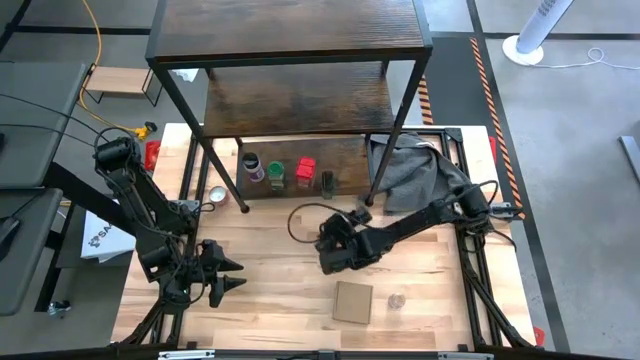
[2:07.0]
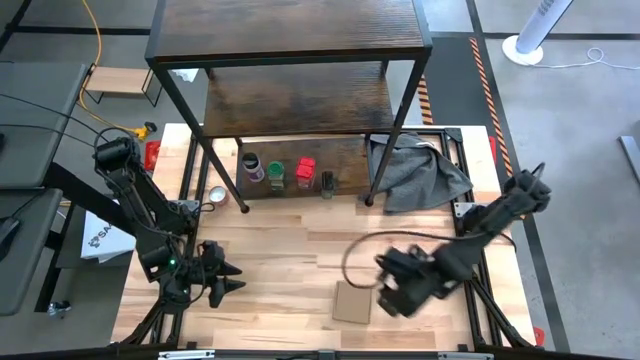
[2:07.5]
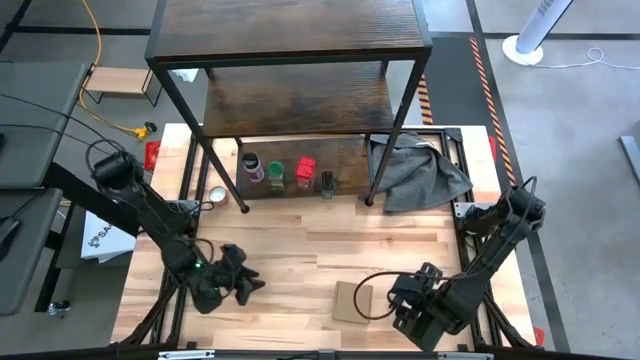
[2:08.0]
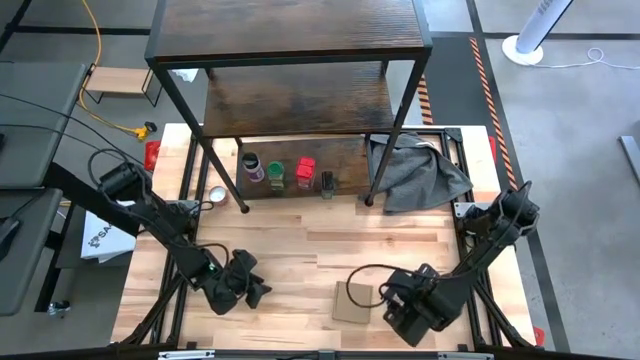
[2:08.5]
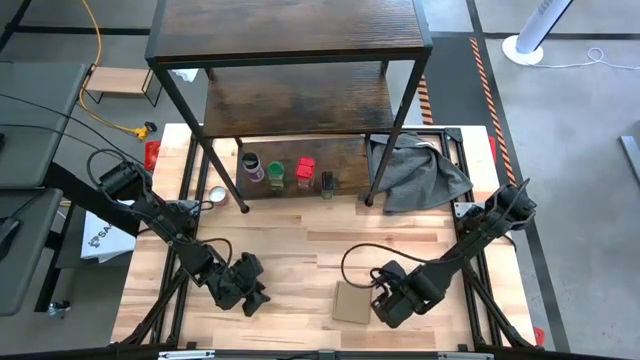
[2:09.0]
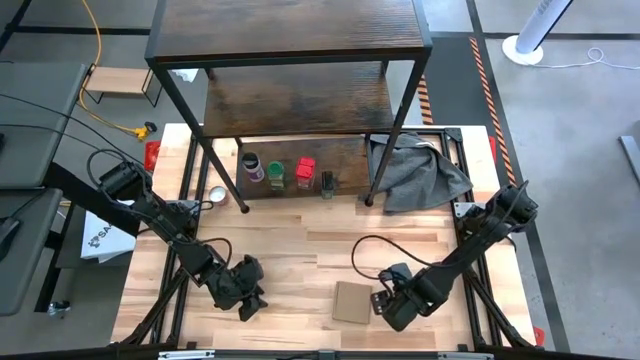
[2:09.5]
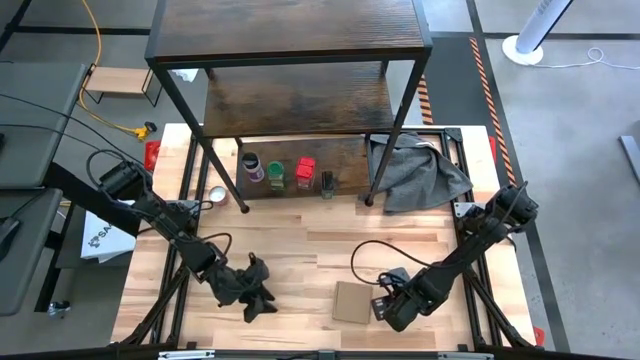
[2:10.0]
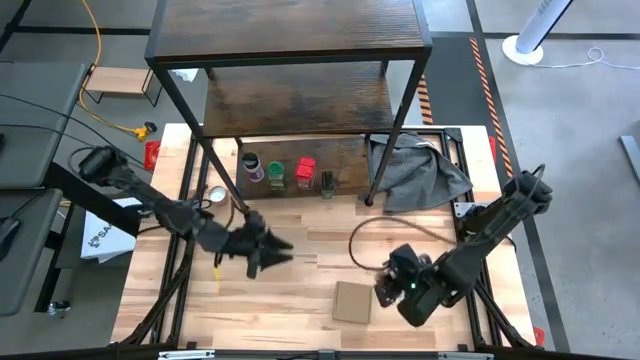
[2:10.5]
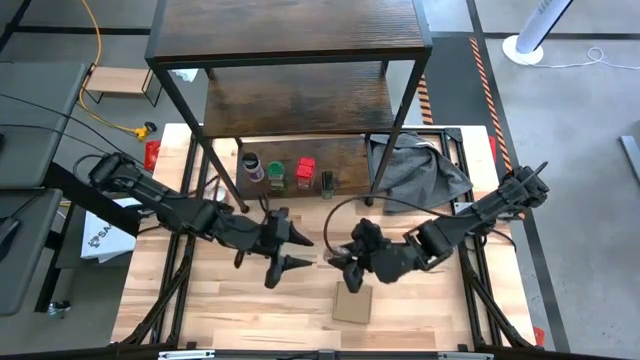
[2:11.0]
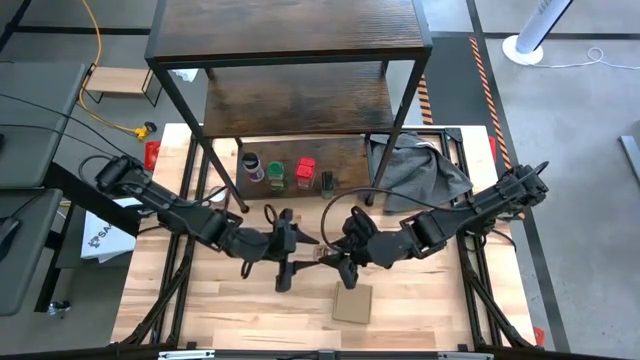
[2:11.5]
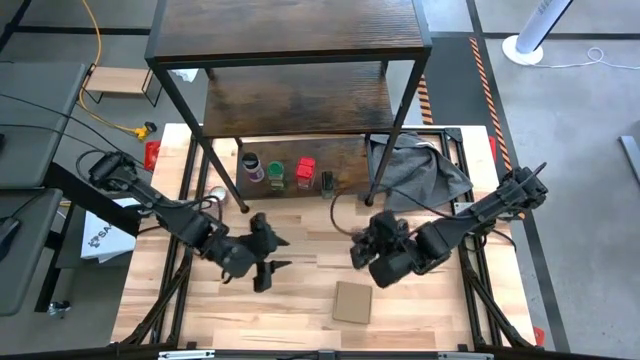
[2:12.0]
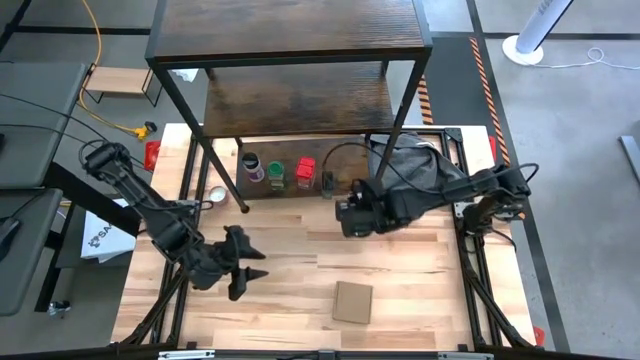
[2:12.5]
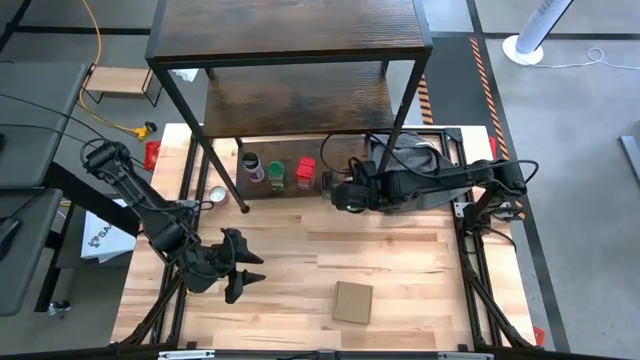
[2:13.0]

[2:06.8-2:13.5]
Task: Shelf spices
Put the brown seasoning bottle on the shelf

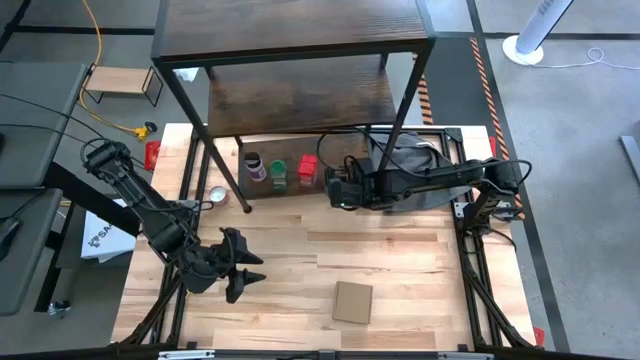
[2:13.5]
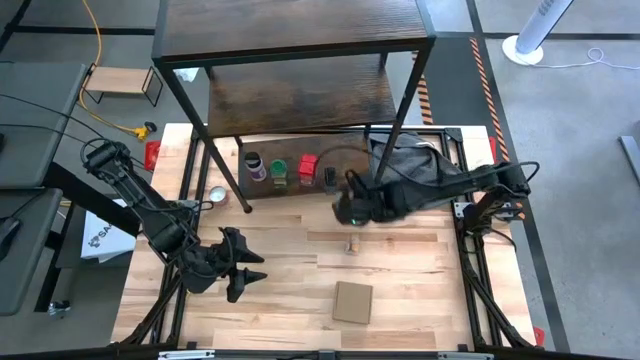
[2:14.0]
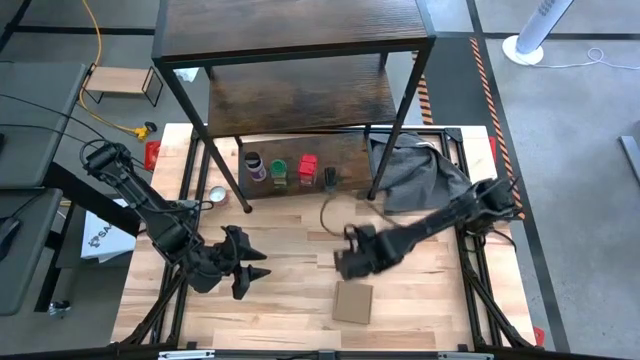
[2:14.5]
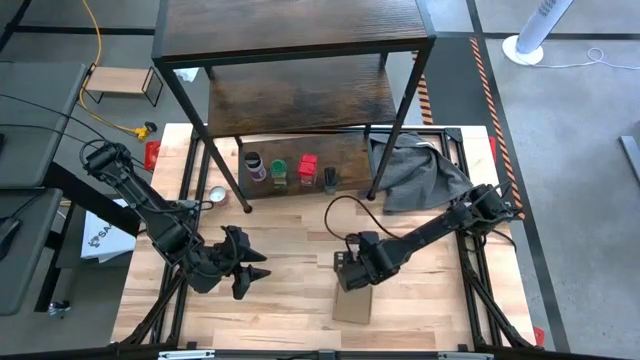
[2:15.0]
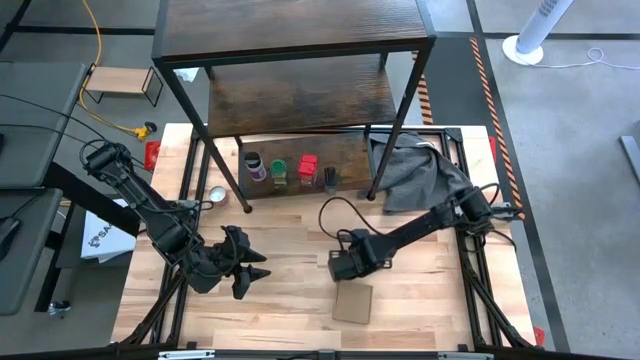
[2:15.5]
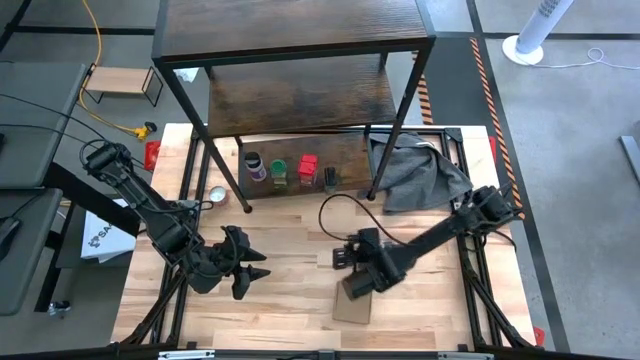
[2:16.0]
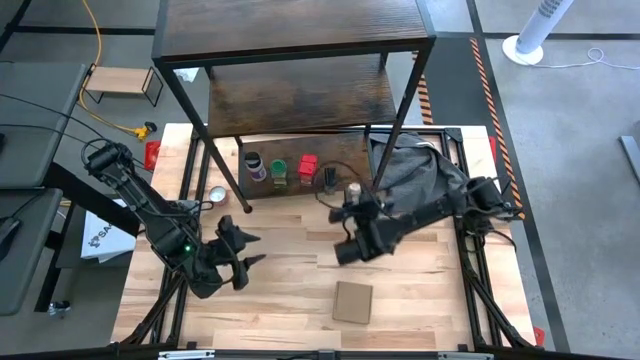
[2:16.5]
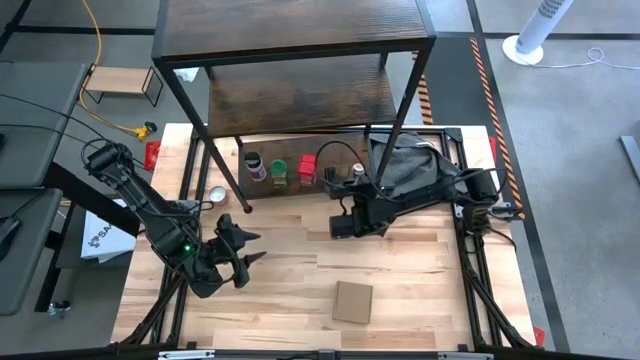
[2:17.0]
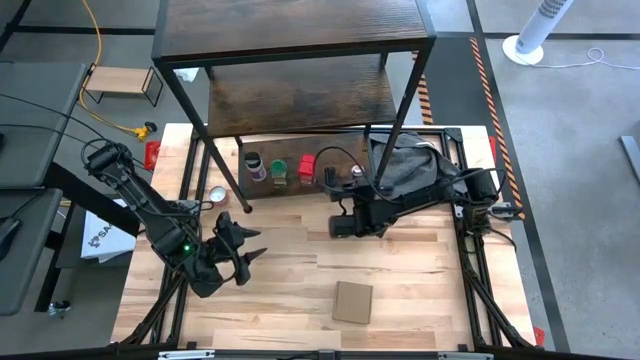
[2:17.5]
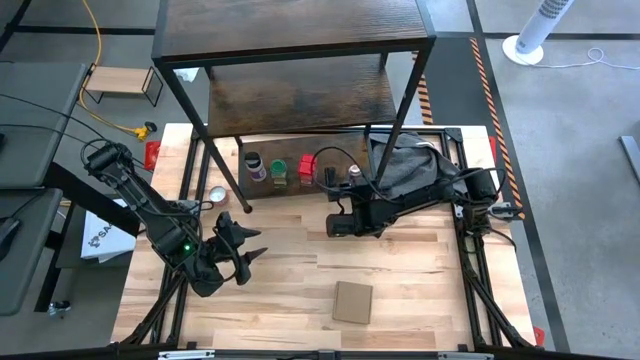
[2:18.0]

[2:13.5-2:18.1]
Put the brown seasoning bottle on the shelf

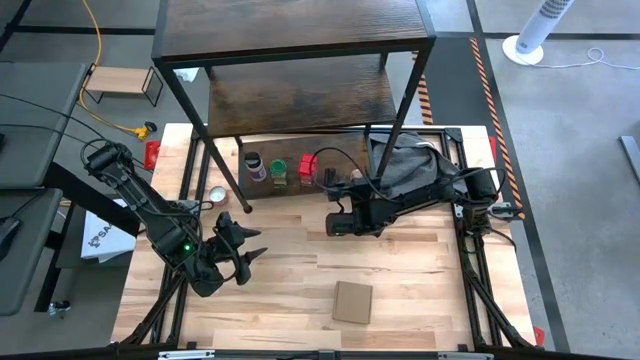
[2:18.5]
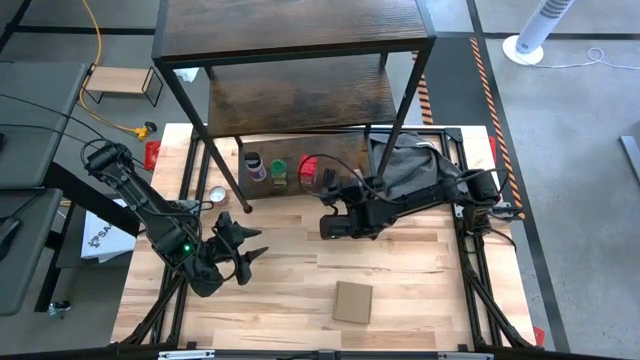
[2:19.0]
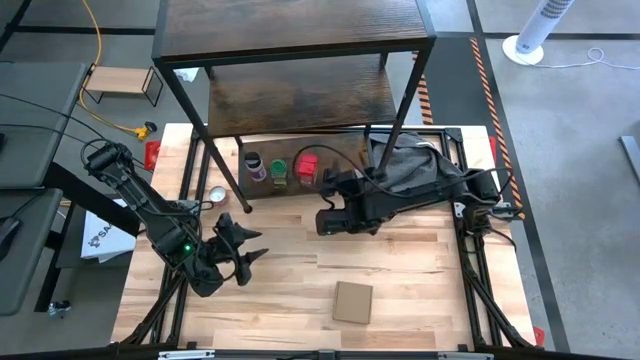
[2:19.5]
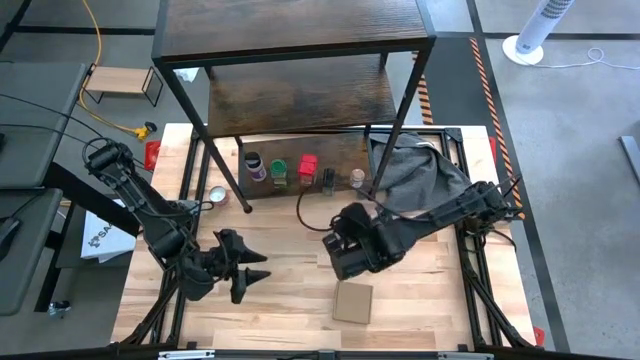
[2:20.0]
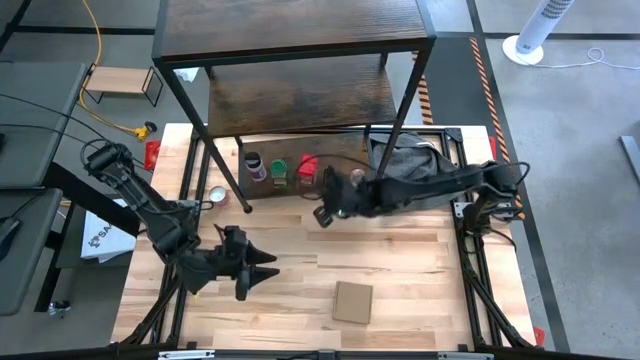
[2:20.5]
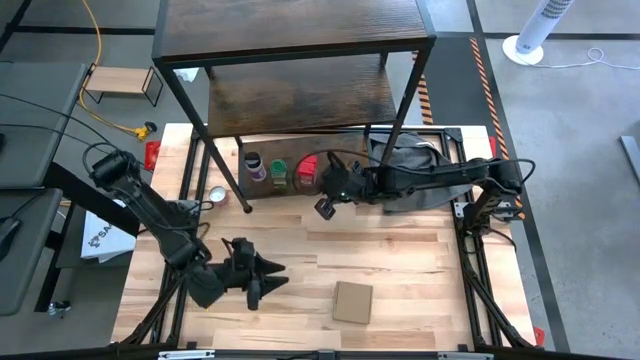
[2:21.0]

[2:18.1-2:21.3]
Adjust the black seasoning can on the shelf

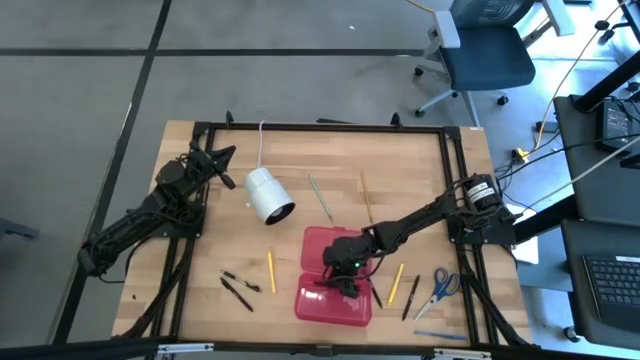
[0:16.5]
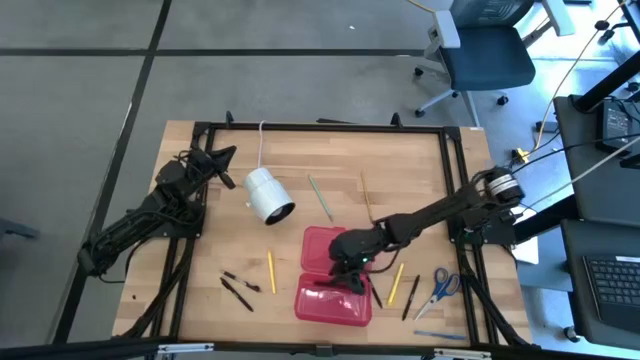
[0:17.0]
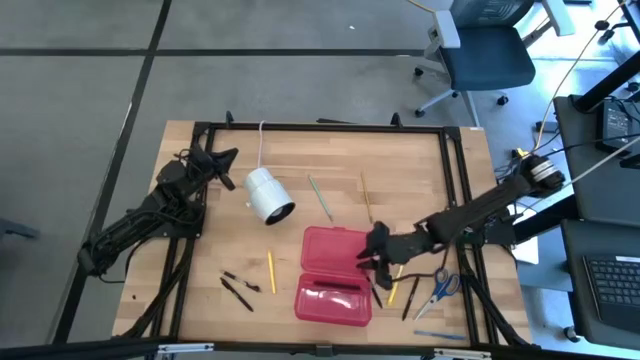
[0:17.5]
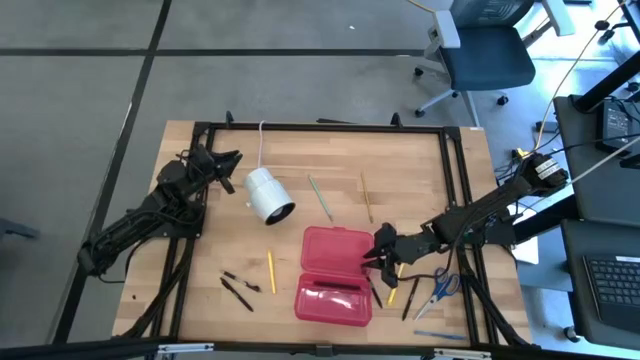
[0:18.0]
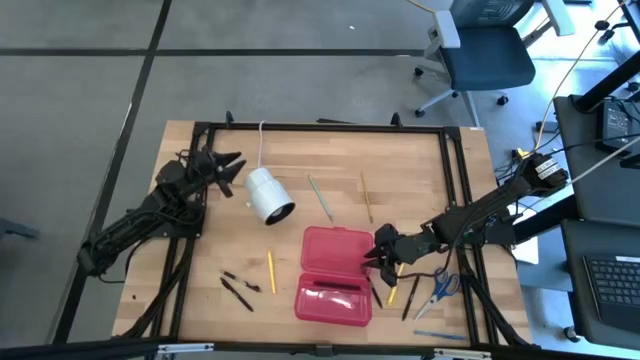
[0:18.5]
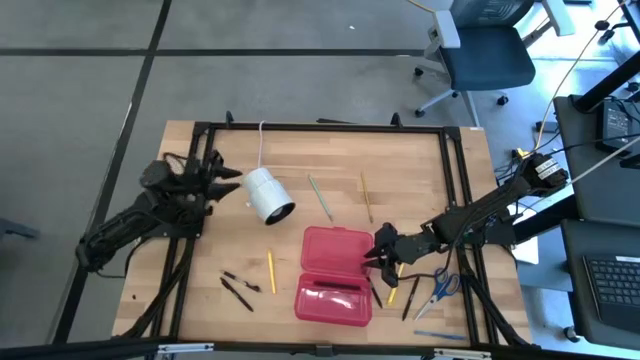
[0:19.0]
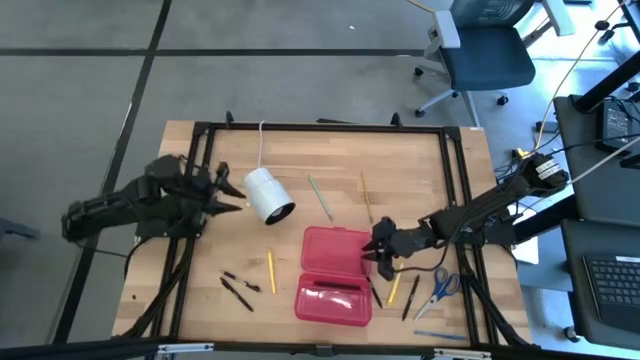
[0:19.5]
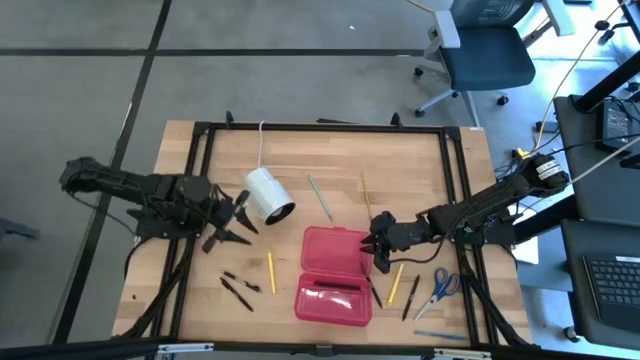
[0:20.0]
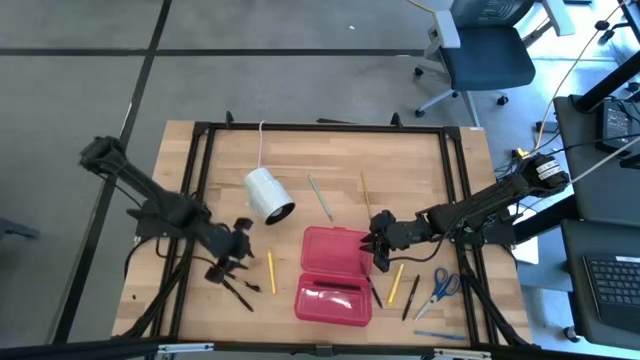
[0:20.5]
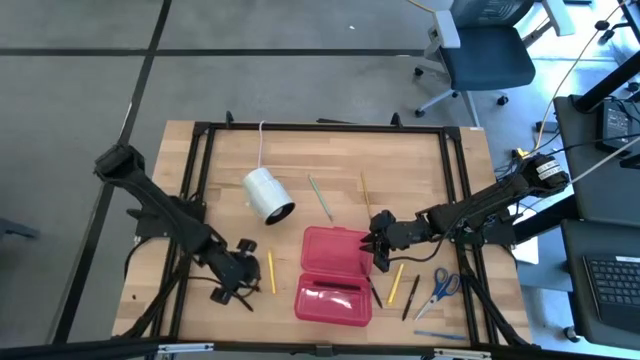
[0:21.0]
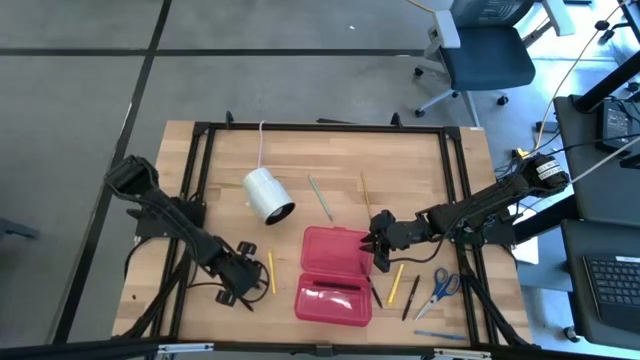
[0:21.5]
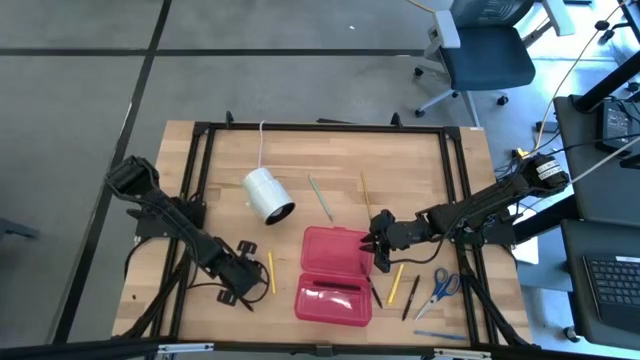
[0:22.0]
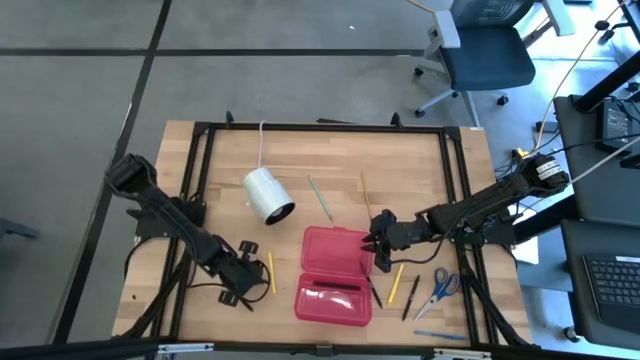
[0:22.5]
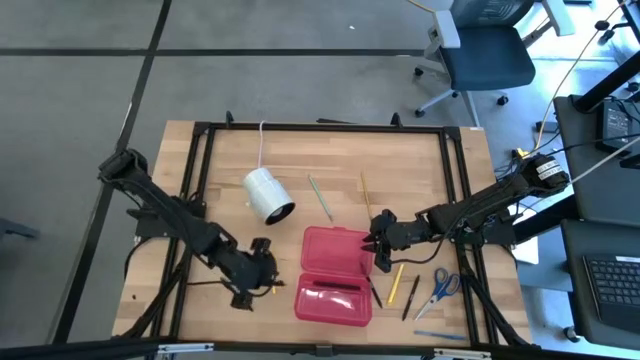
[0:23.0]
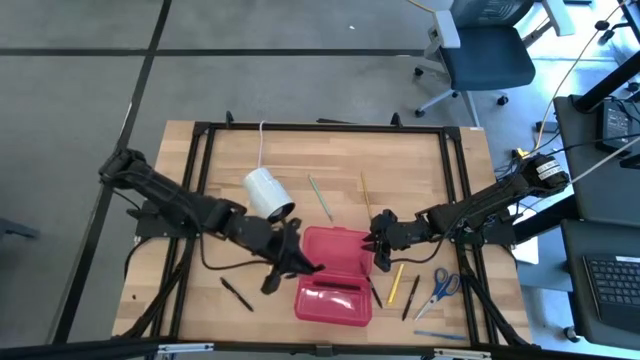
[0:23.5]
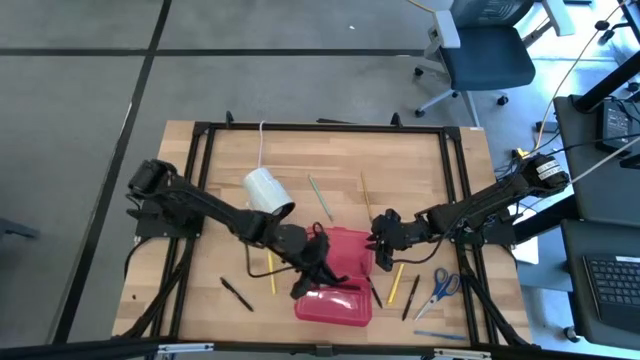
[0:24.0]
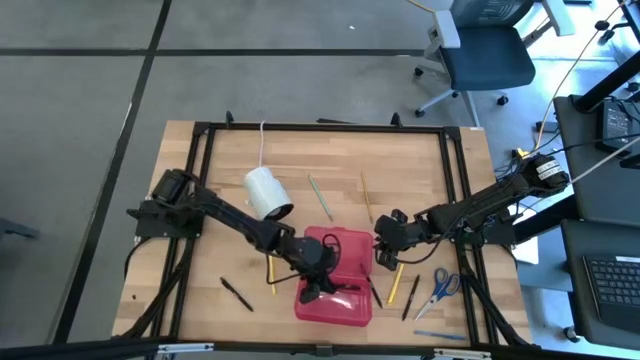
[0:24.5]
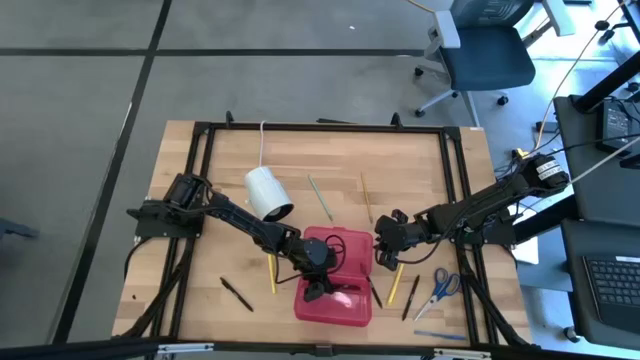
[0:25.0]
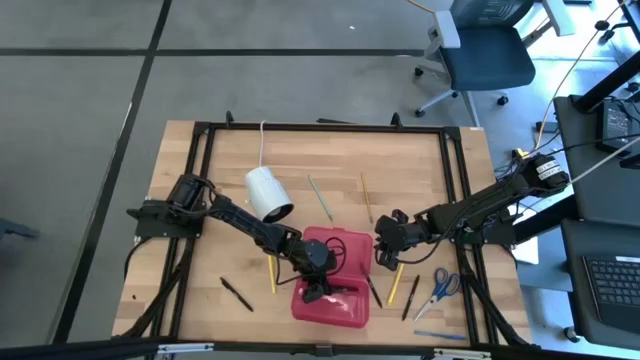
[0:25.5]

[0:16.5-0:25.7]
Task: Pick & place school supplies into a supply box
Put the transparent pen into the pink supply box
